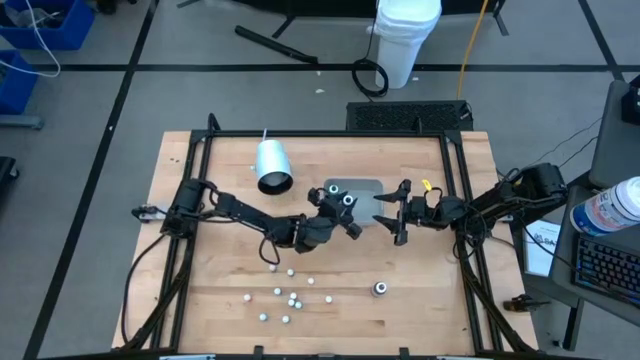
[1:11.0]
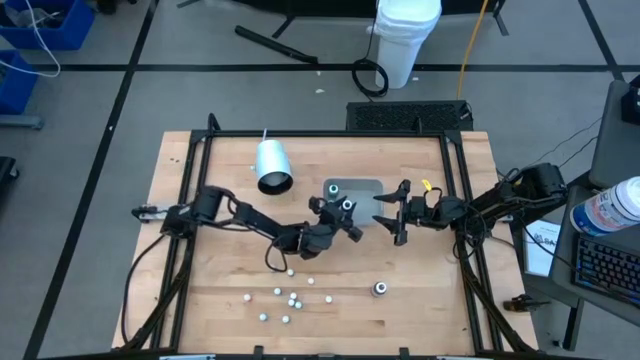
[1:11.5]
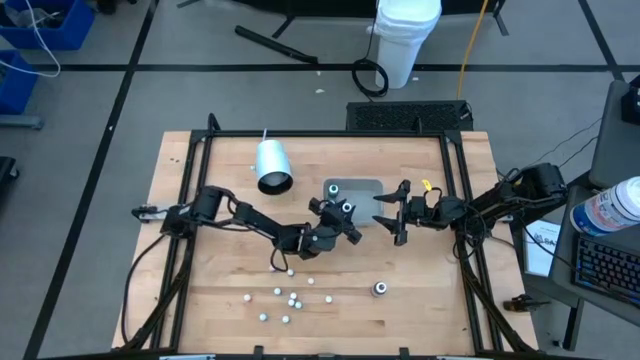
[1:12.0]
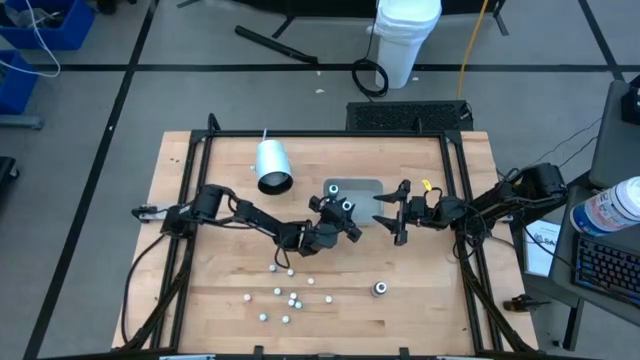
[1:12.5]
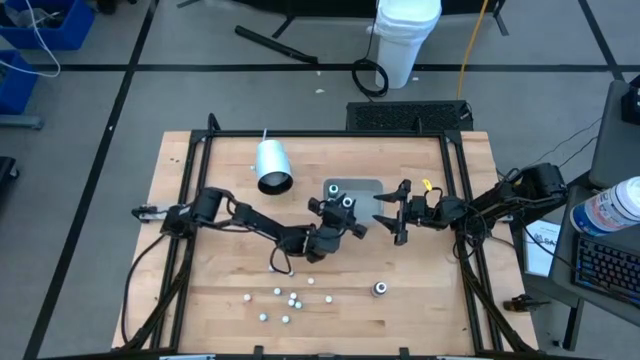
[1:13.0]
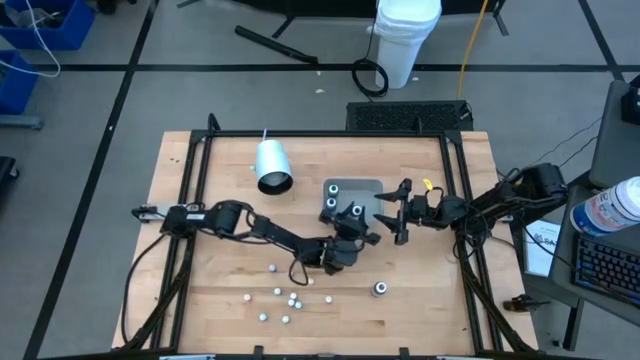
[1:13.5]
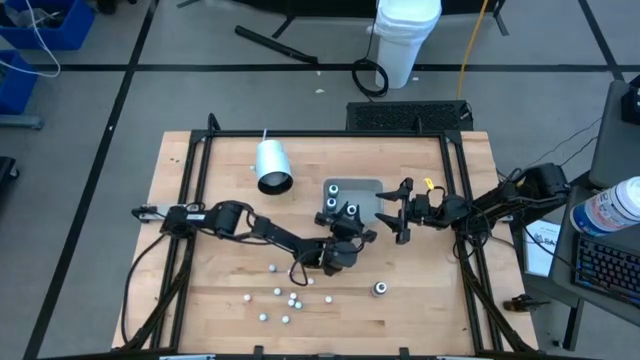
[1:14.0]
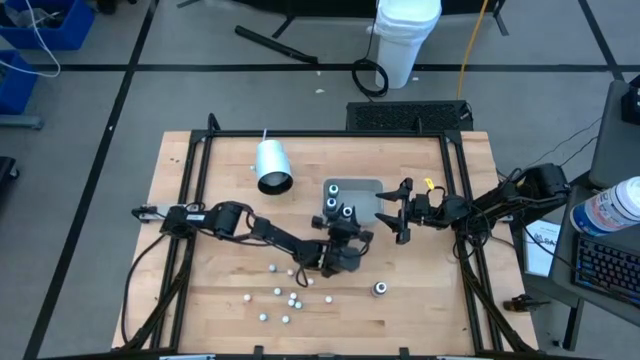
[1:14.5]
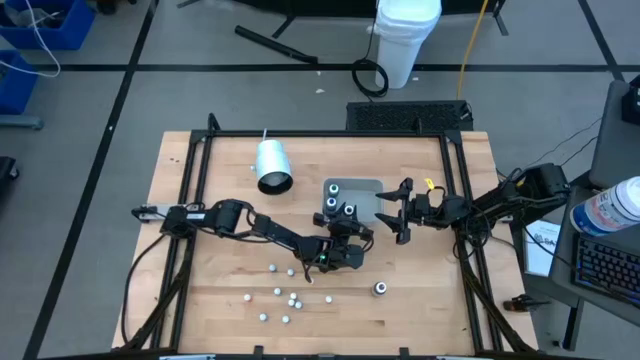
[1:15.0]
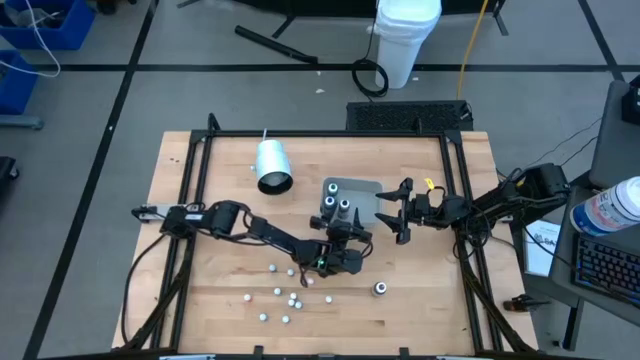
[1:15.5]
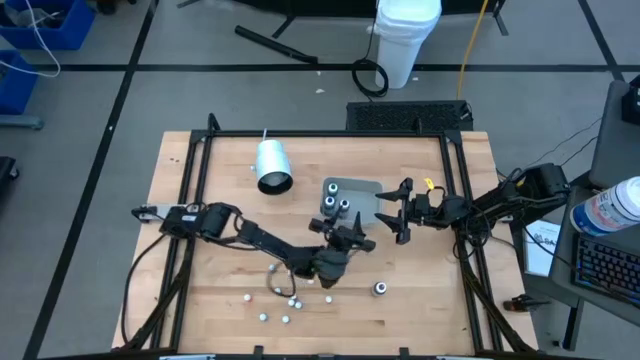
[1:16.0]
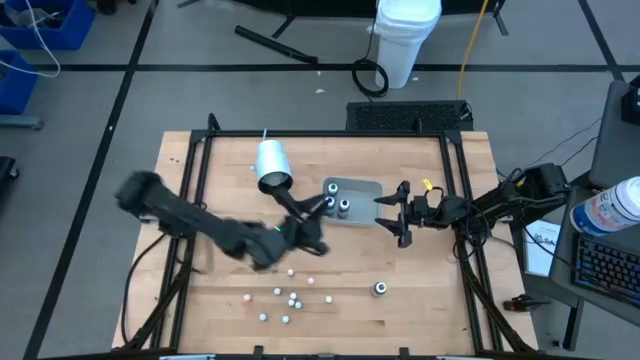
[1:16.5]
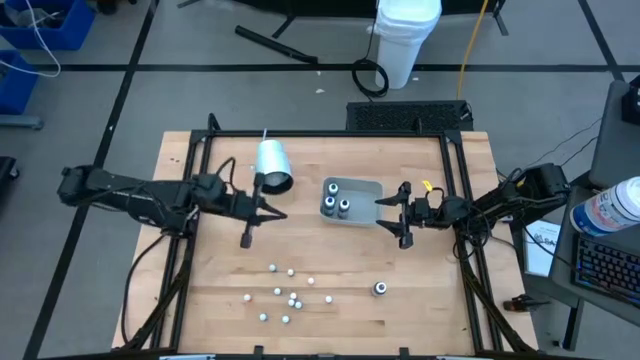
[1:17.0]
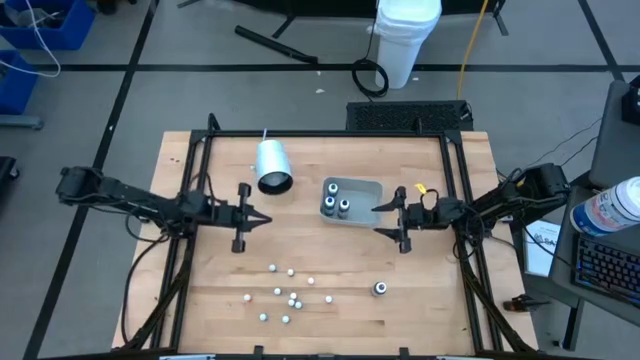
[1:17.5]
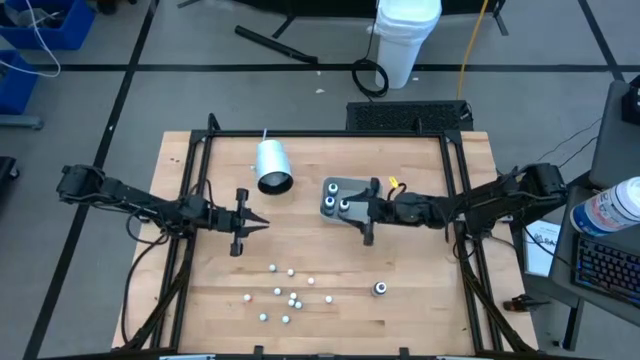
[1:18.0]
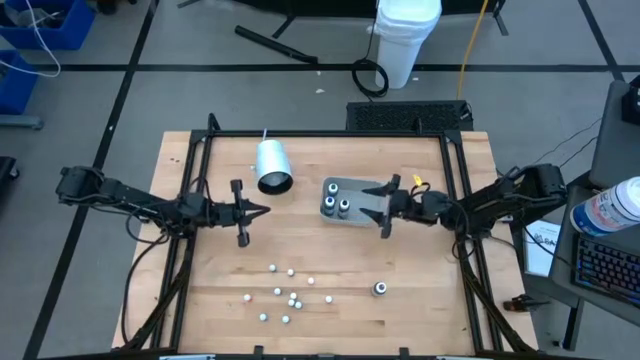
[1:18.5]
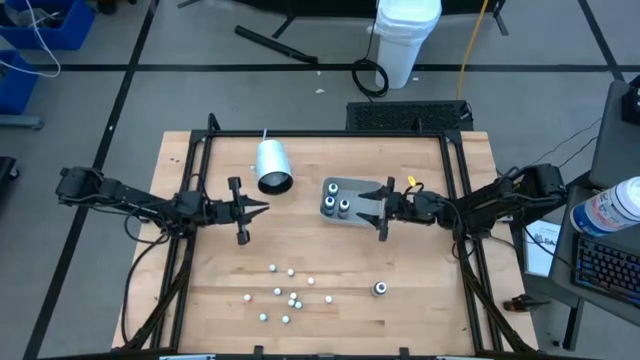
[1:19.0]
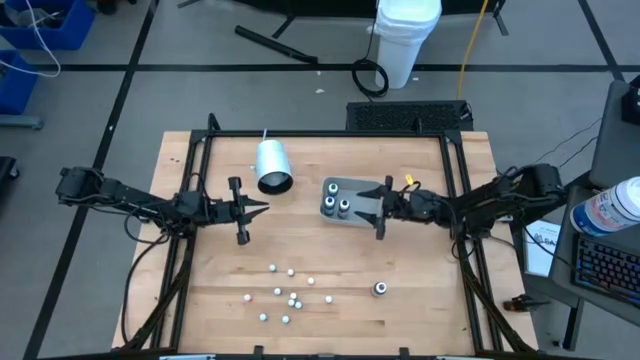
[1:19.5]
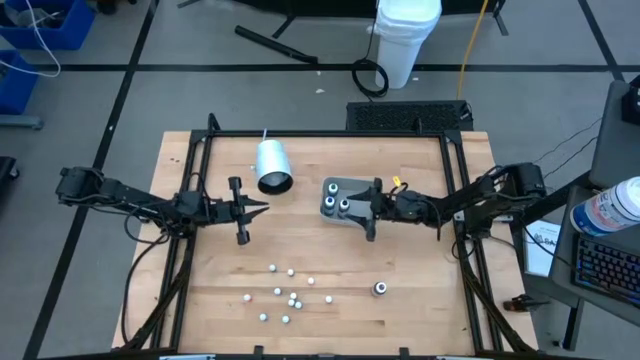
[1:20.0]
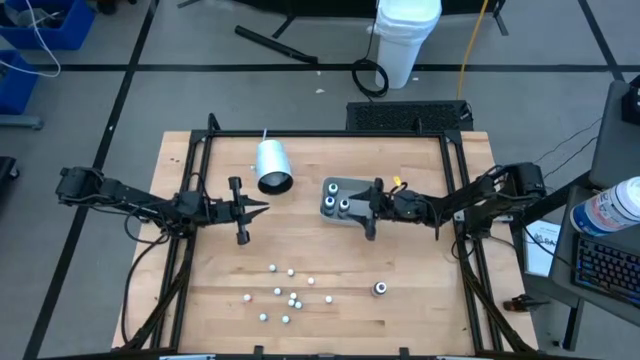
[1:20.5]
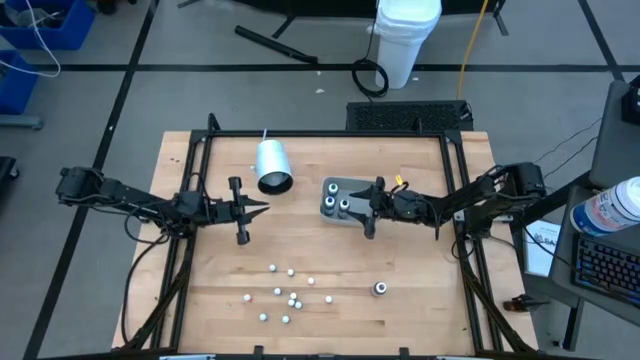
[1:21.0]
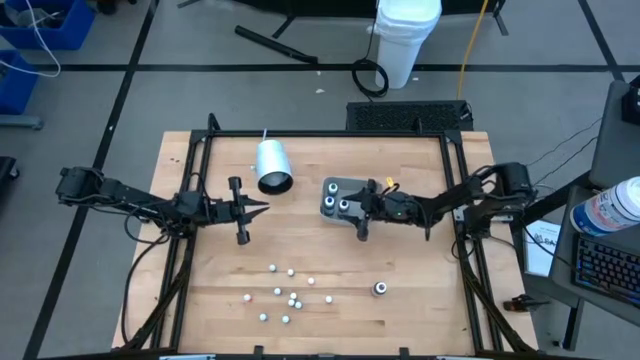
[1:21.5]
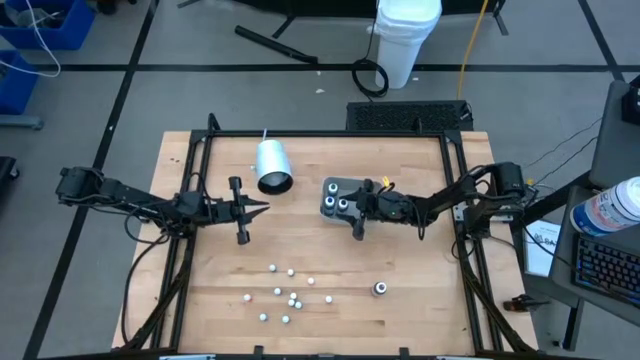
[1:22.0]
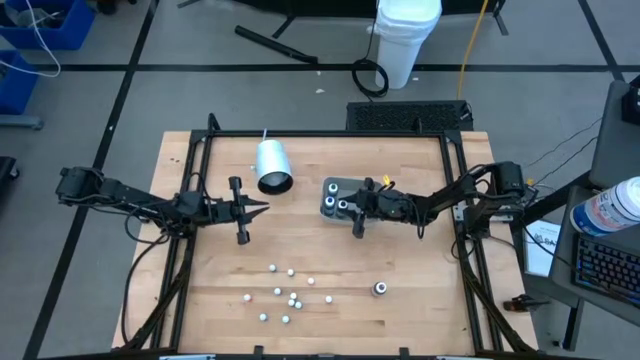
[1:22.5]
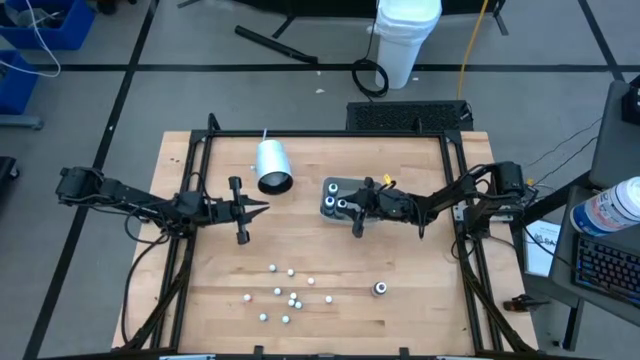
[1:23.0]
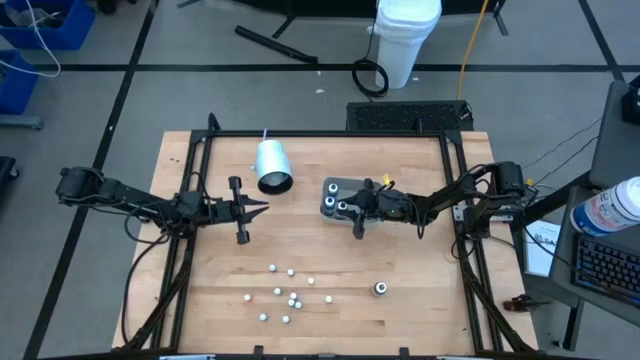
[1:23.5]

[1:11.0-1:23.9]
Task: Pick & Place food coloring
Put the black food coloring bottle into the gray bin

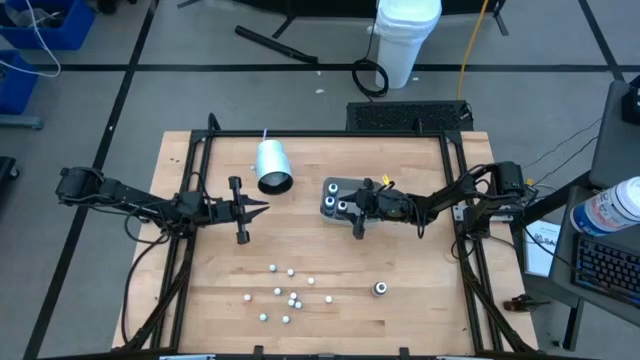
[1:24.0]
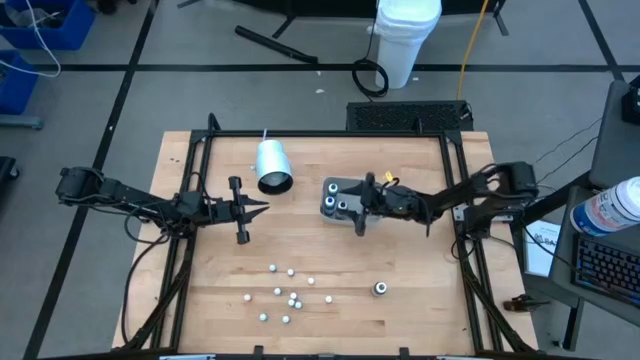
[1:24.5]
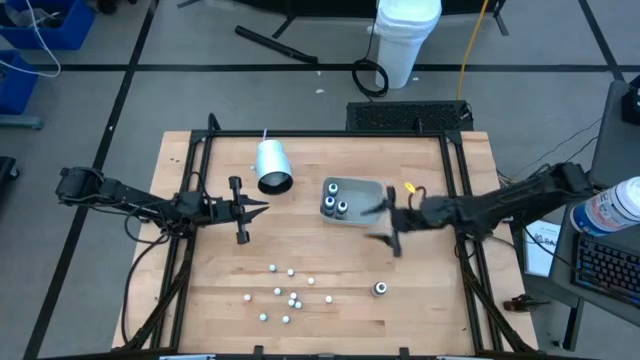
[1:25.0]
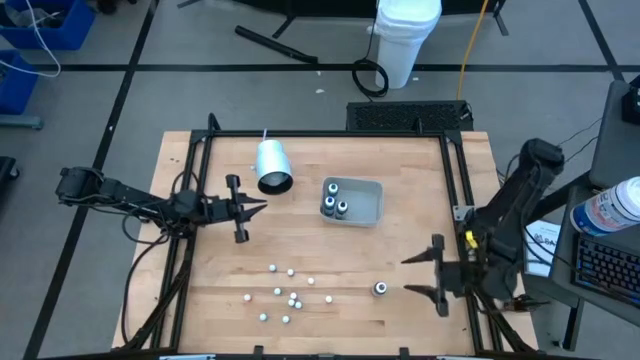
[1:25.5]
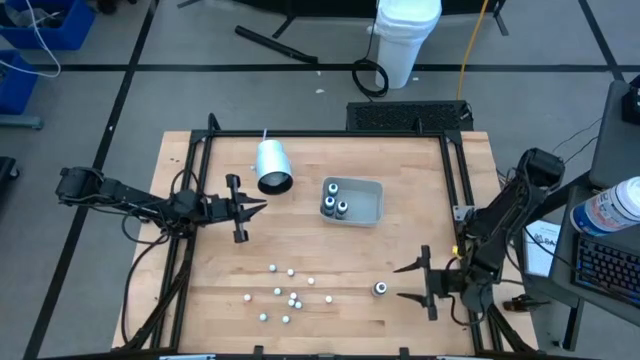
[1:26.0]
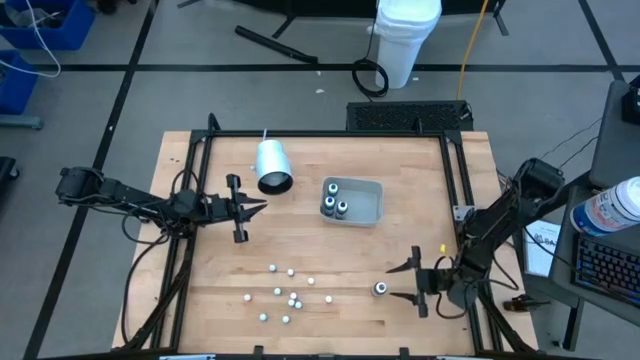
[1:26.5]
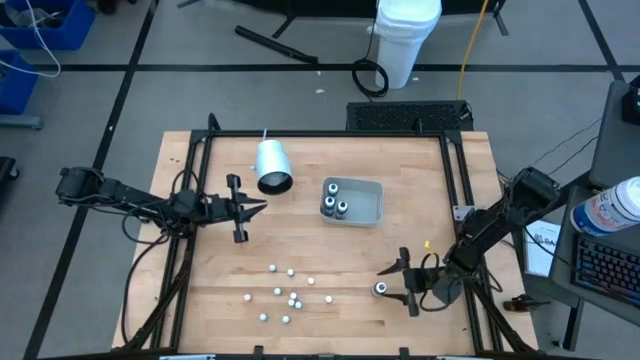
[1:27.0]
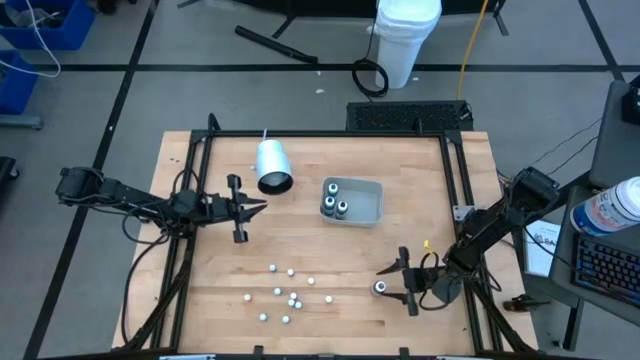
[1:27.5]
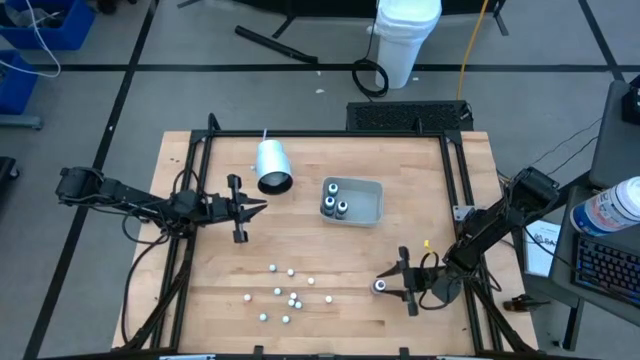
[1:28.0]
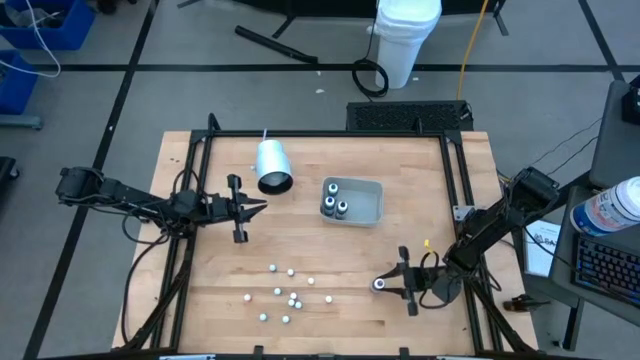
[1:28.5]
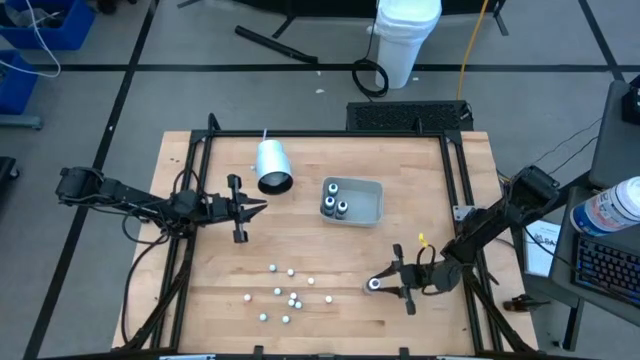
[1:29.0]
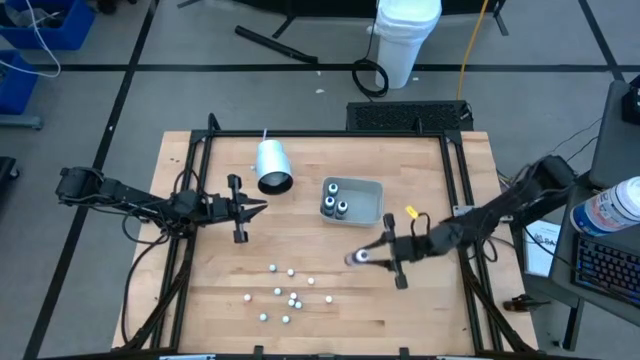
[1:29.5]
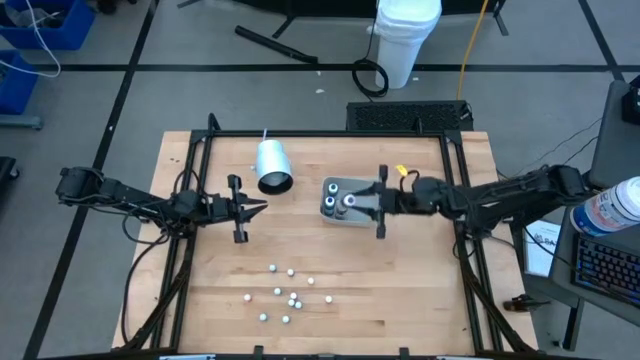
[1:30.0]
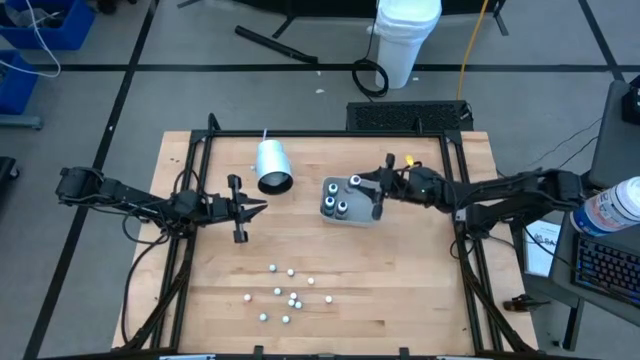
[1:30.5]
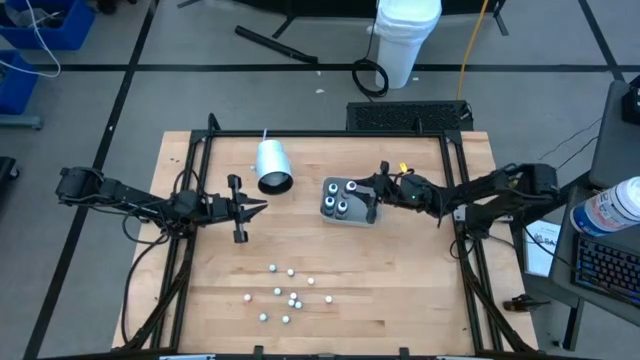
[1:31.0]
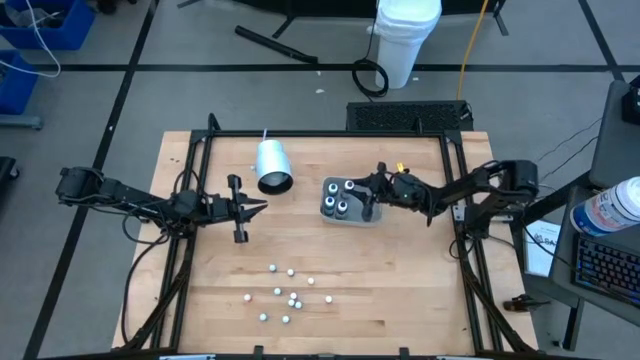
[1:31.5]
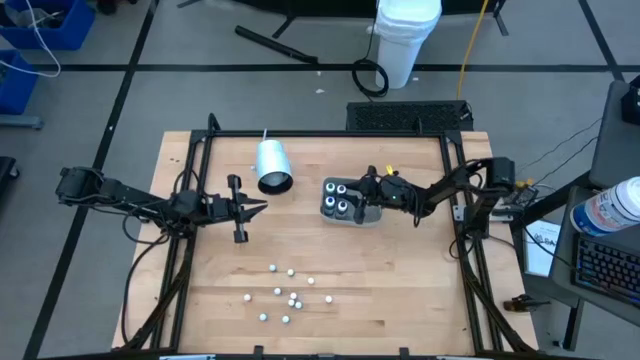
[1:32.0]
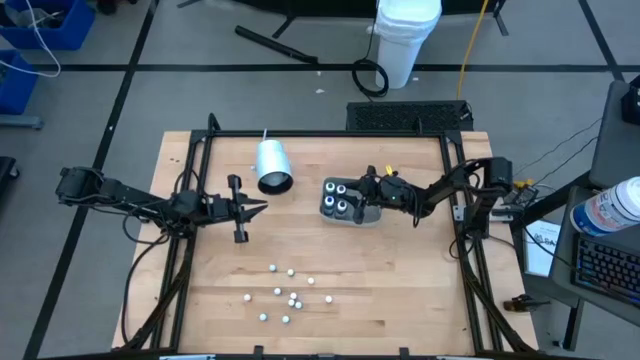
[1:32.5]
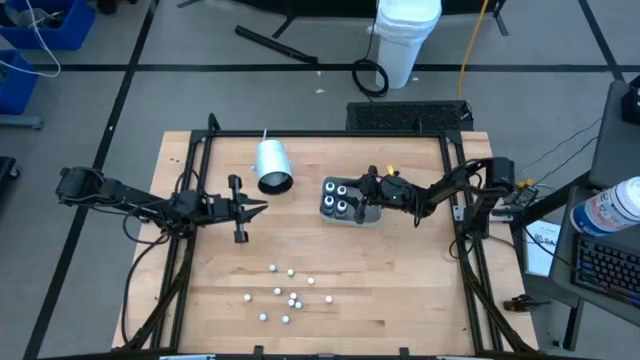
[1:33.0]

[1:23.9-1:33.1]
Put the violet food coloring bottle into the gray bin
